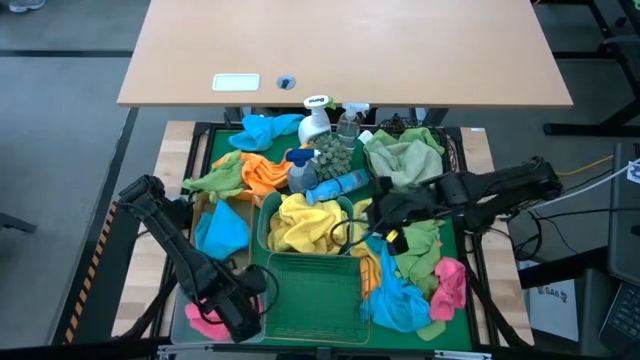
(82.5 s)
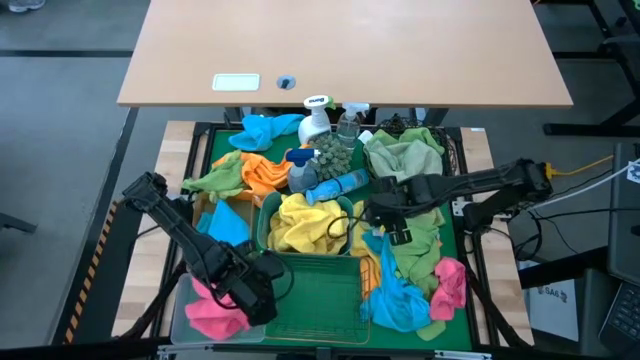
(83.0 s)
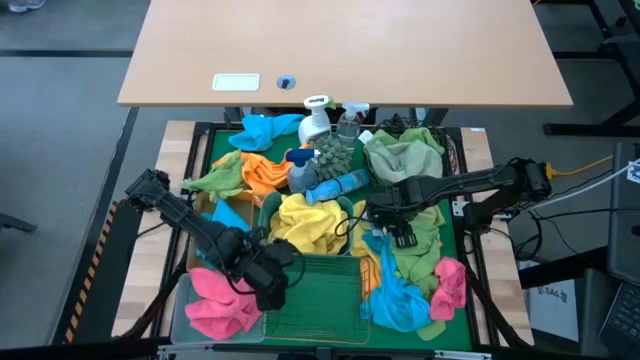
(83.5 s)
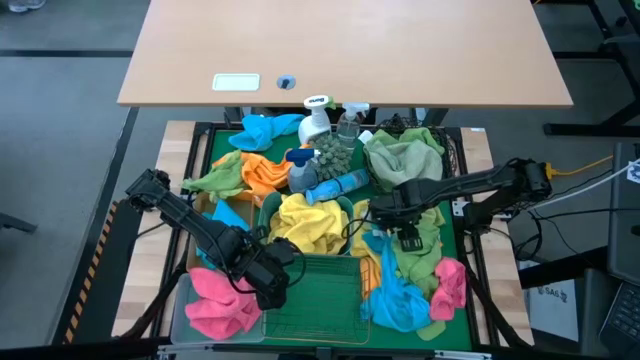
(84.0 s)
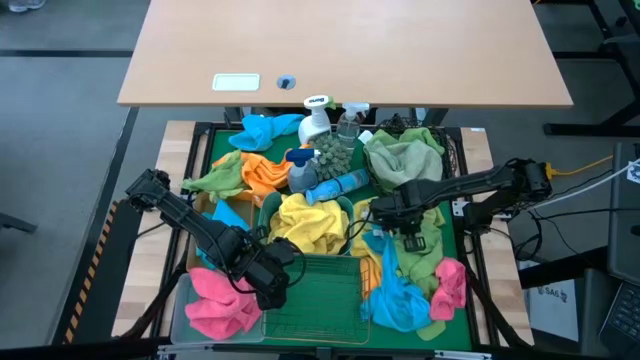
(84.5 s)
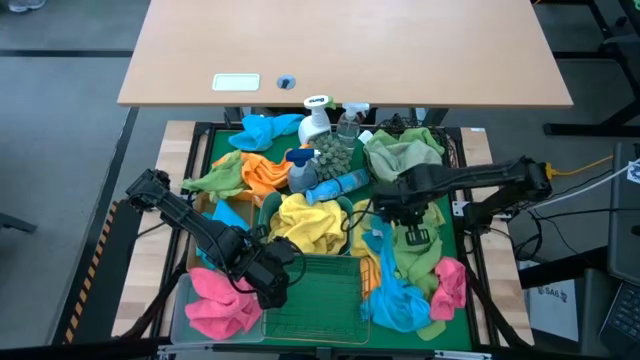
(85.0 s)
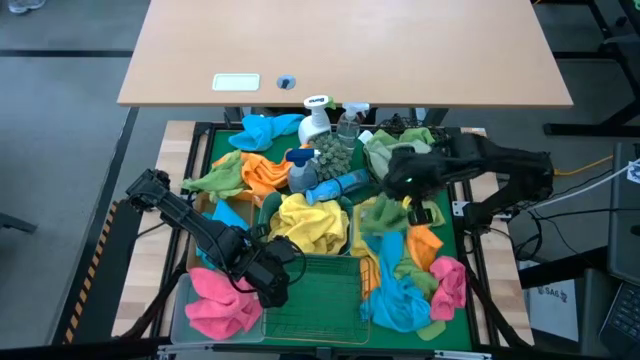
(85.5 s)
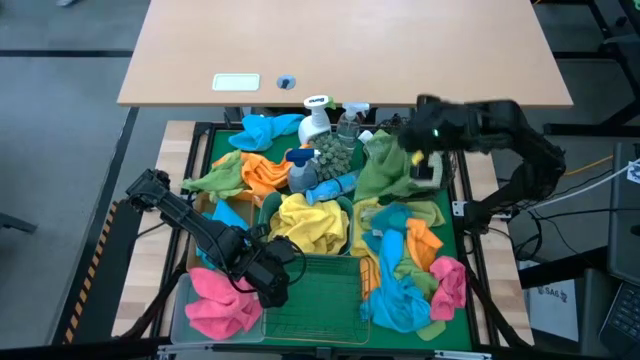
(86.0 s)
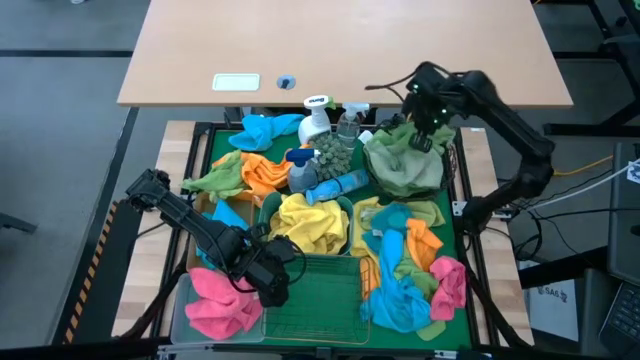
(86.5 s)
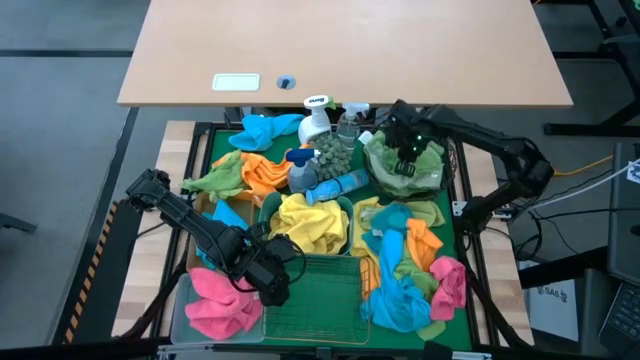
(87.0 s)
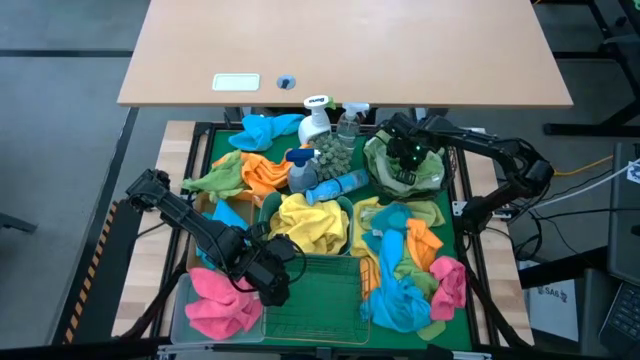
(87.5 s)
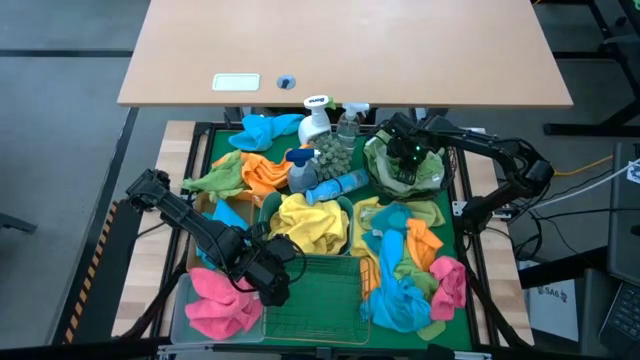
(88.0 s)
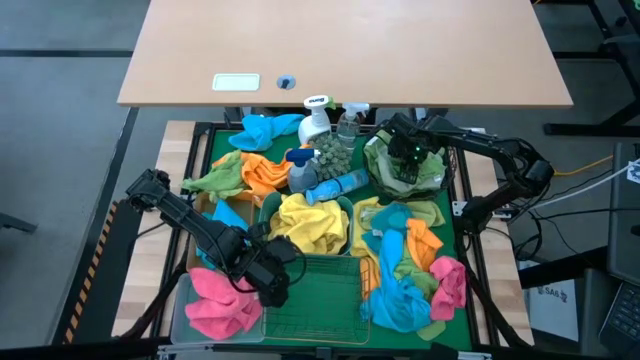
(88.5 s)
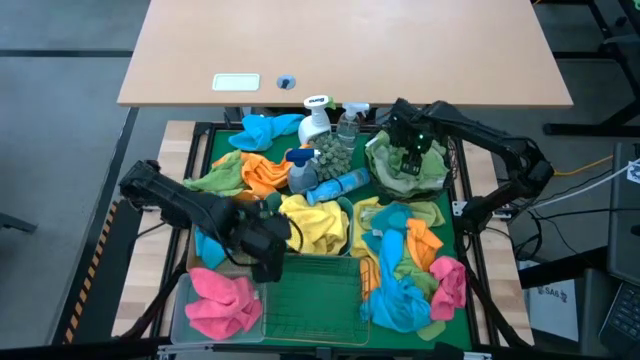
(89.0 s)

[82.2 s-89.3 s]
Task: Sort microfiber towel by color & place in baskets
Put the green microfiber towel into the black wire basket

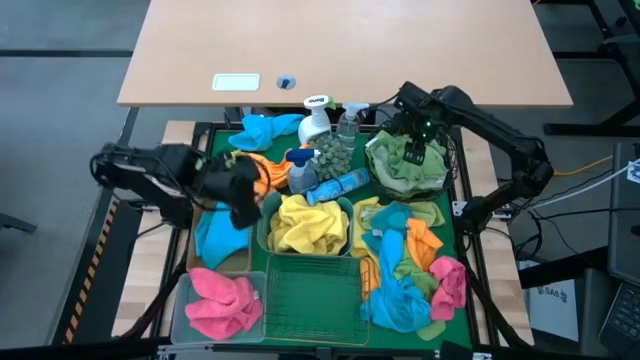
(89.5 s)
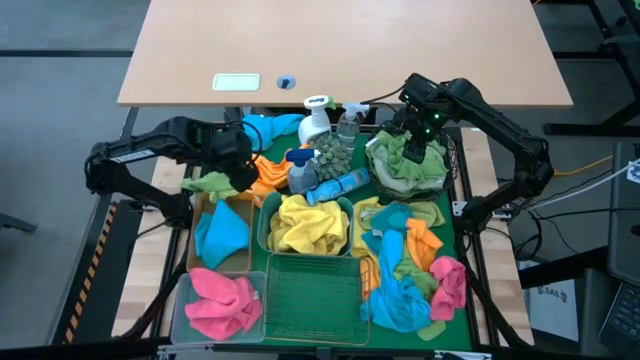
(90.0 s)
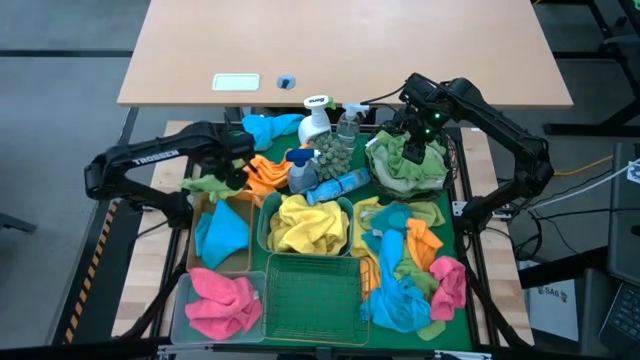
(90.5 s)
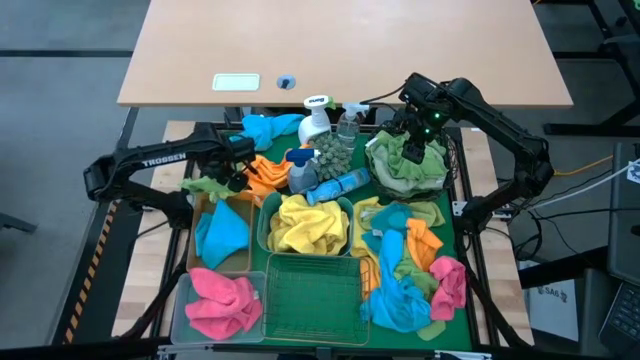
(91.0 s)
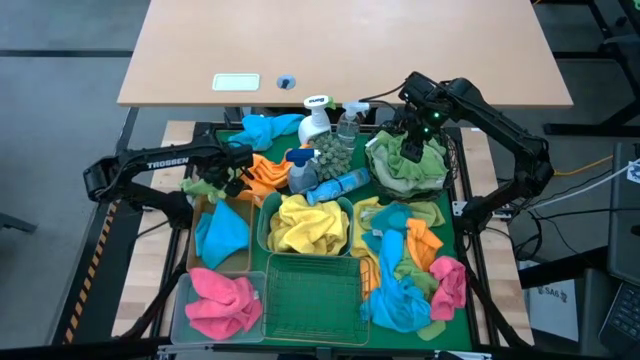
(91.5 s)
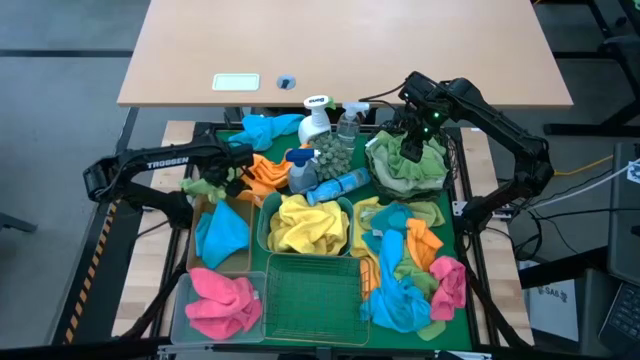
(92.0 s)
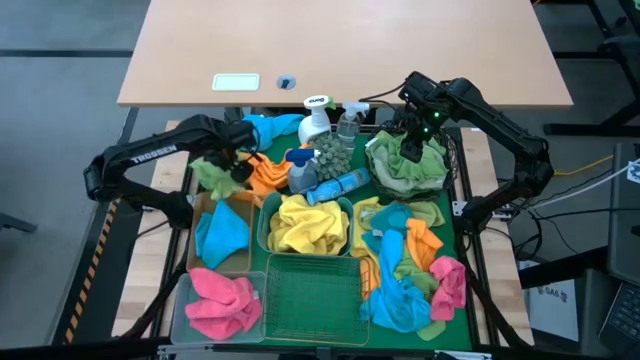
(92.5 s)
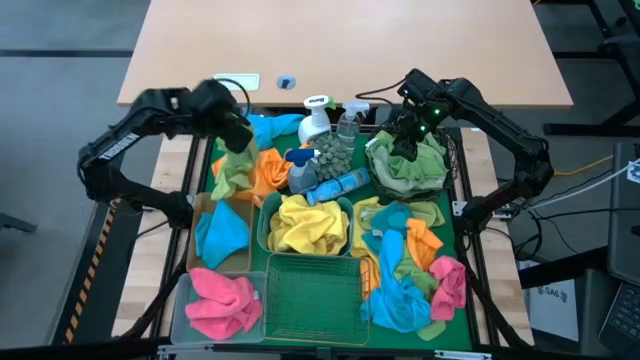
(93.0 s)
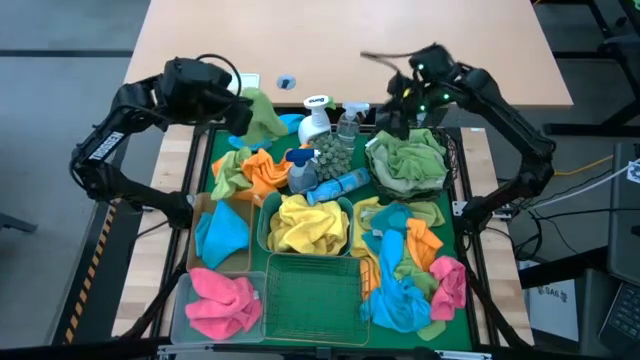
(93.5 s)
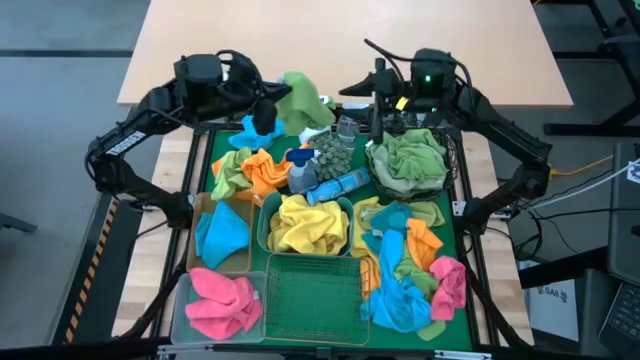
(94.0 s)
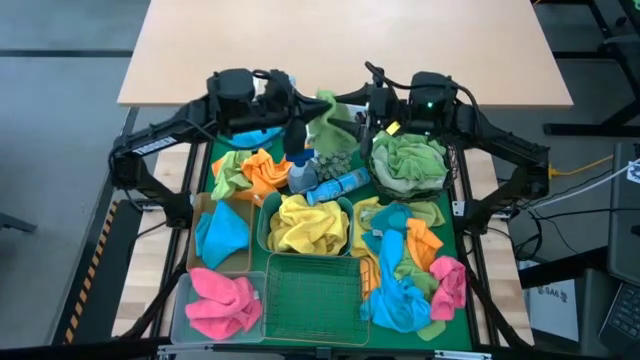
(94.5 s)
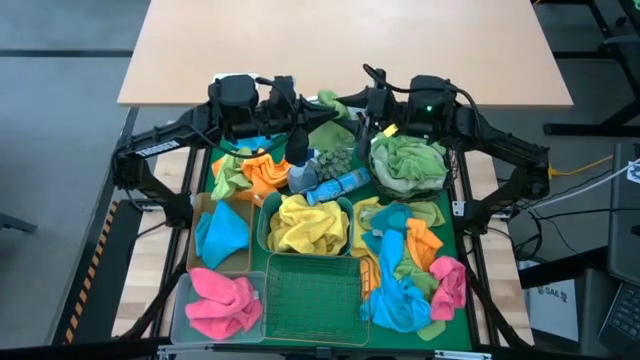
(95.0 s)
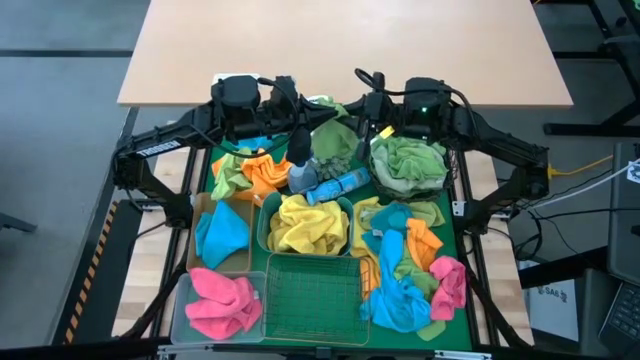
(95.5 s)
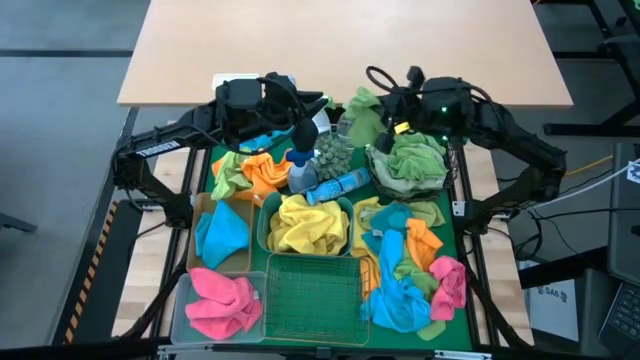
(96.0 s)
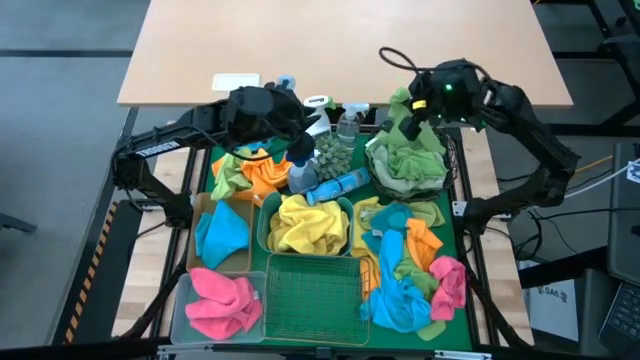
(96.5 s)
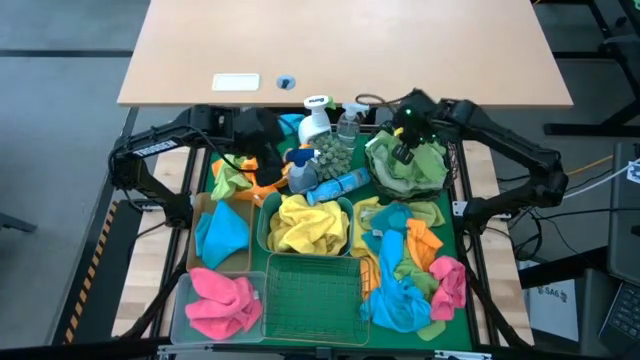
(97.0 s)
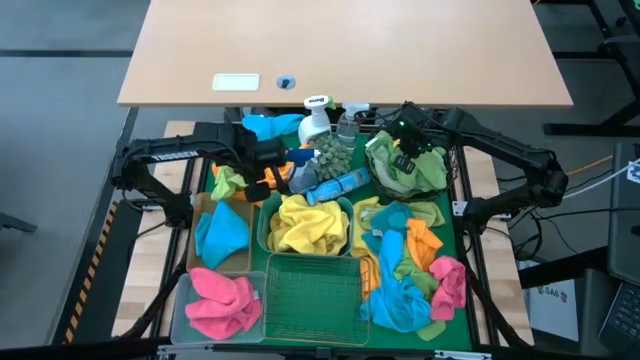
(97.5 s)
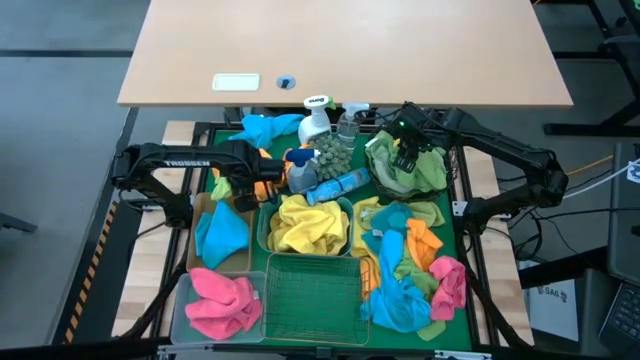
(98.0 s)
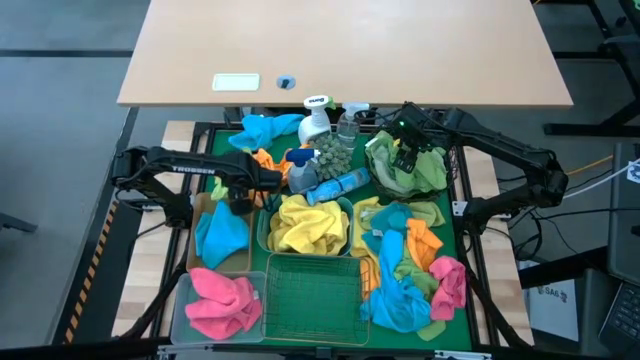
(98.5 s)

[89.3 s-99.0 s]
Put the green microfiber towel into the black wire basket

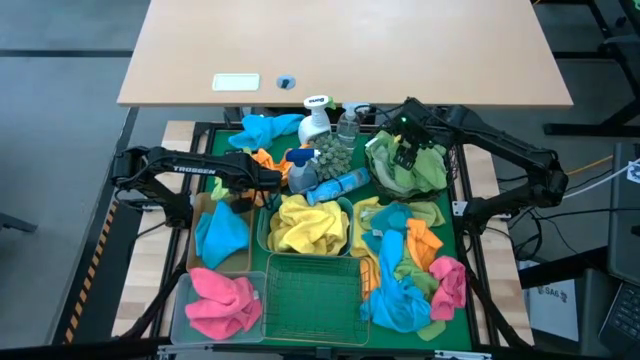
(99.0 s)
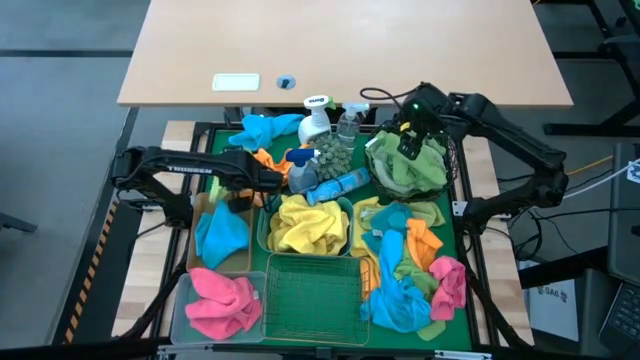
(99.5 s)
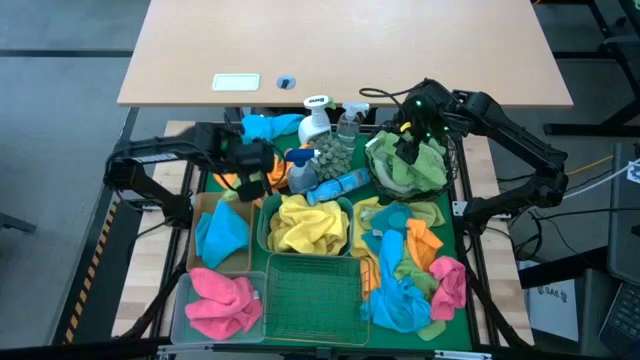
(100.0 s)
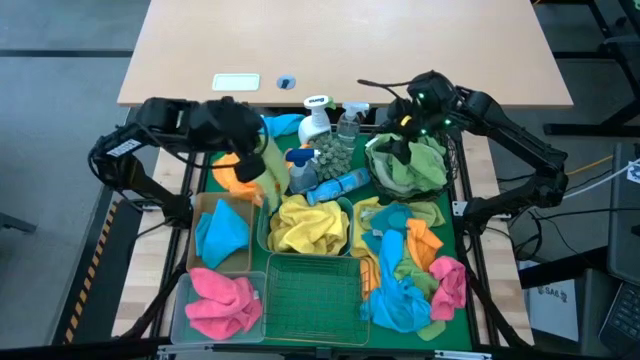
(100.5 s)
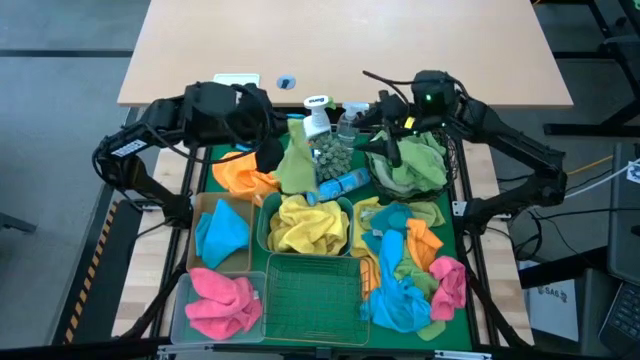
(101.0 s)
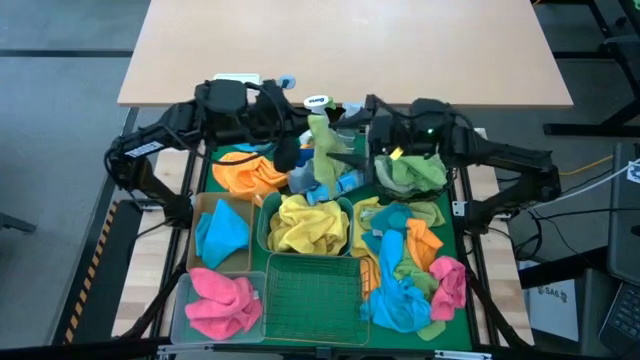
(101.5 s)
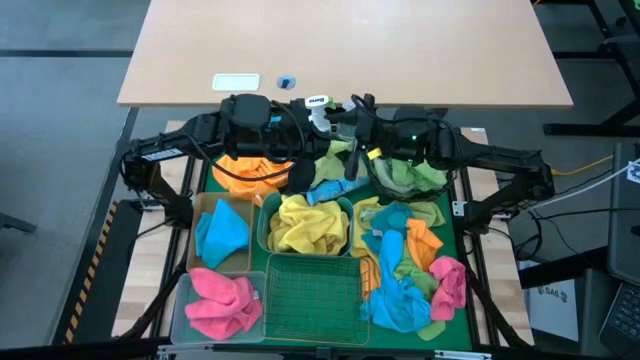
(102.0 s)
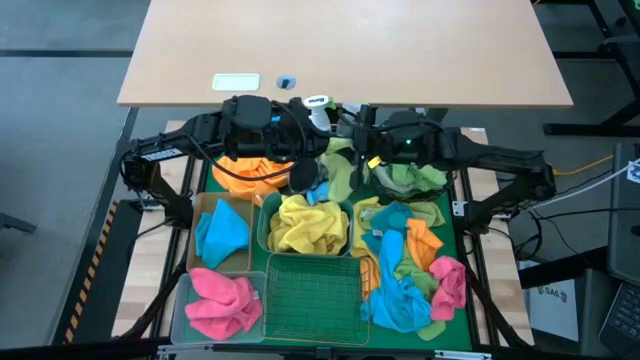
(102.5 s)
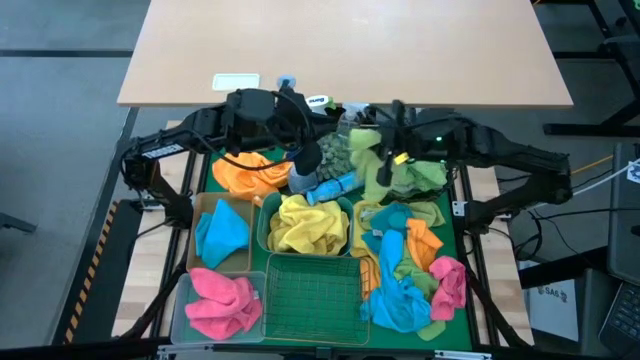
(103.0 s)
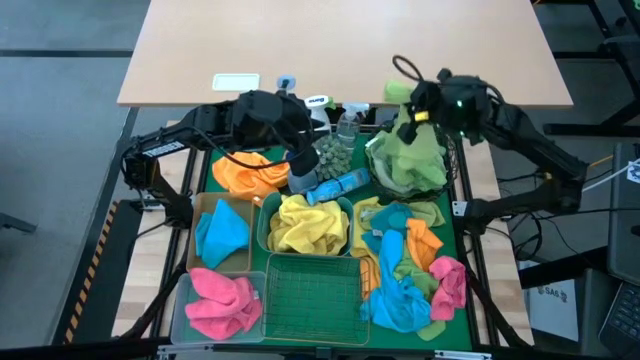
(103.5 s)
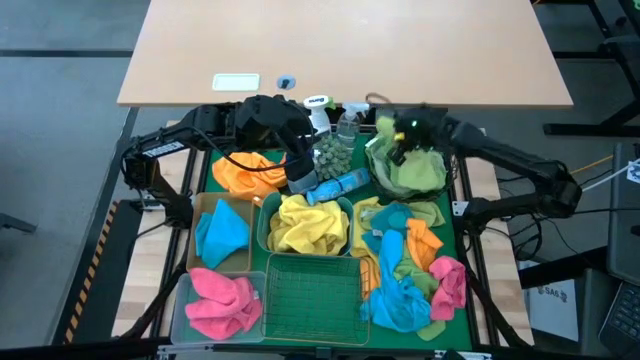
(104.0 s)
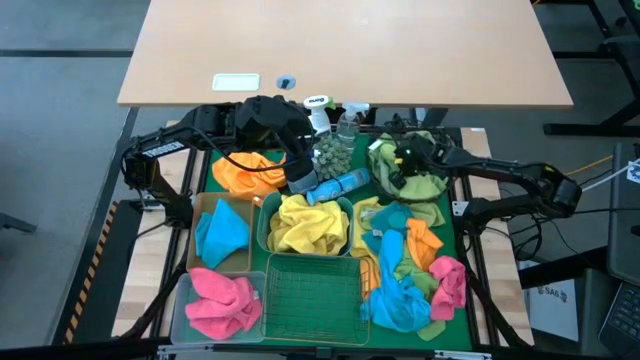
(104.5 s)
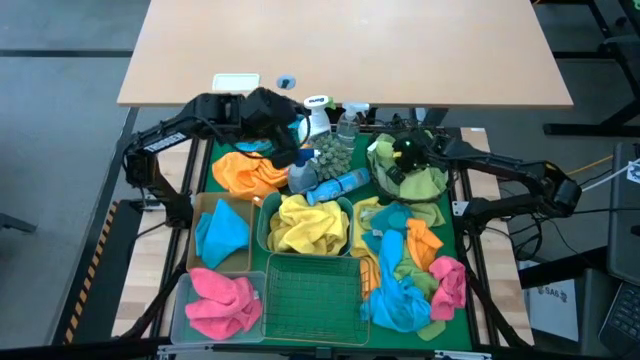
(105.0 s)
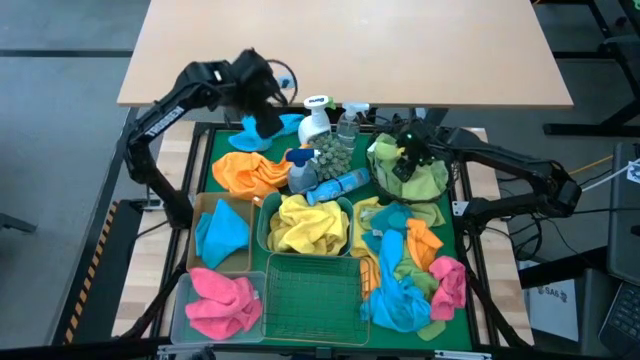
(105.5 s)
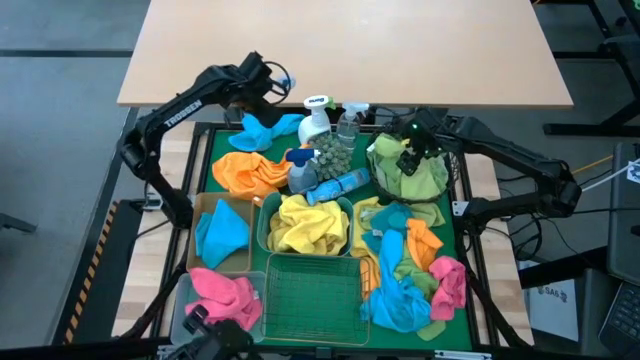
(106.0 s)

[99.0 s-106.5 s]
Put the green microfiber towel into the black wire basket
